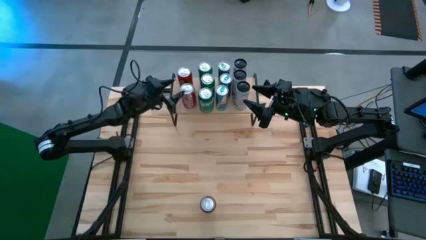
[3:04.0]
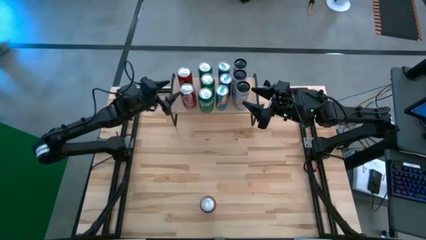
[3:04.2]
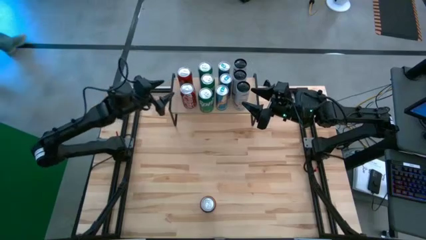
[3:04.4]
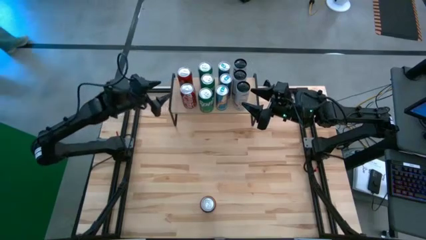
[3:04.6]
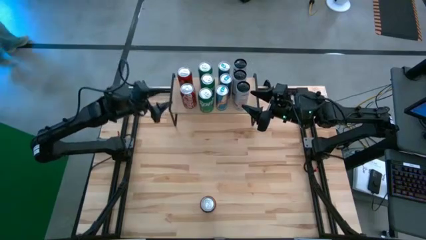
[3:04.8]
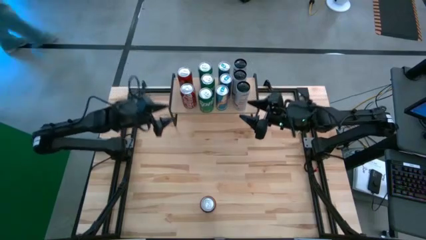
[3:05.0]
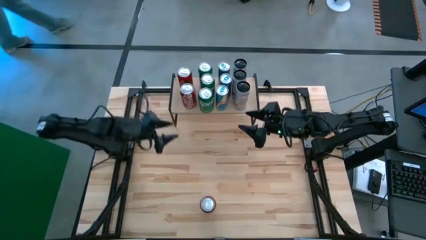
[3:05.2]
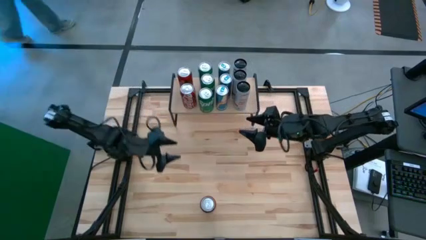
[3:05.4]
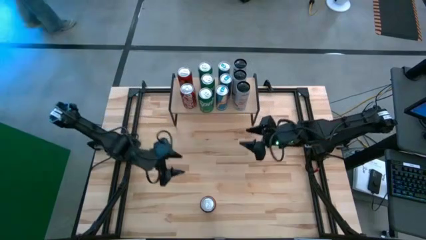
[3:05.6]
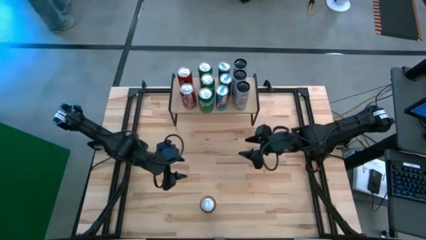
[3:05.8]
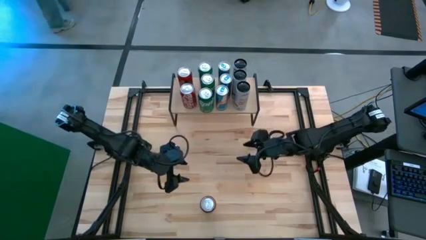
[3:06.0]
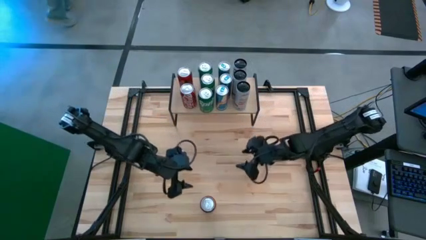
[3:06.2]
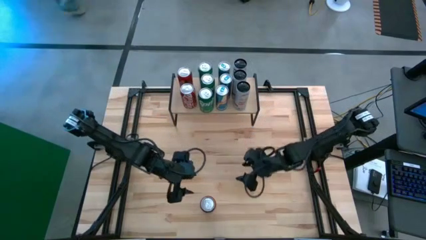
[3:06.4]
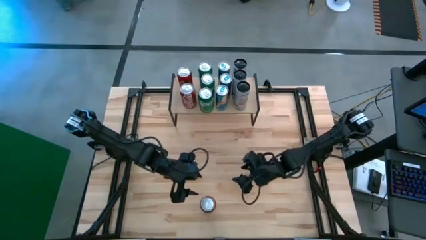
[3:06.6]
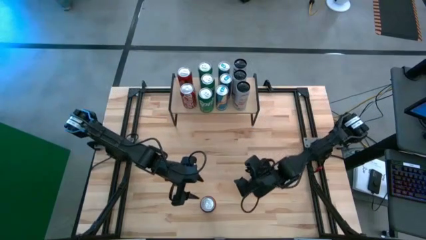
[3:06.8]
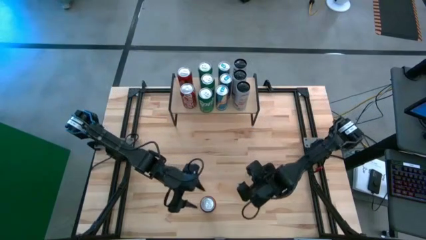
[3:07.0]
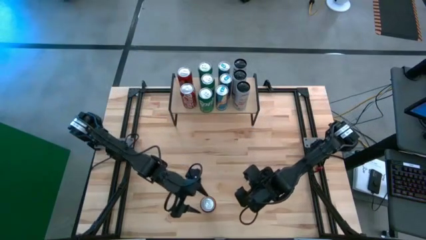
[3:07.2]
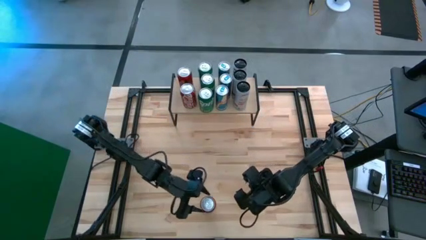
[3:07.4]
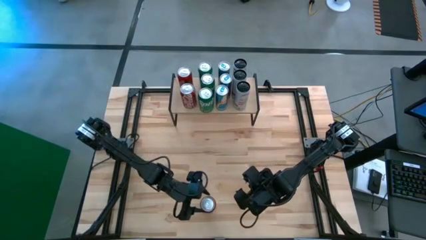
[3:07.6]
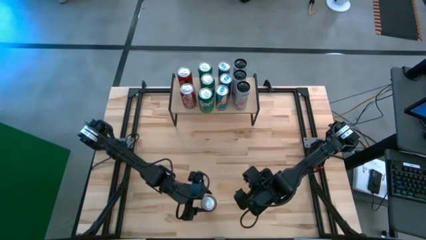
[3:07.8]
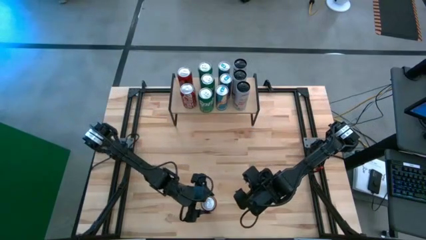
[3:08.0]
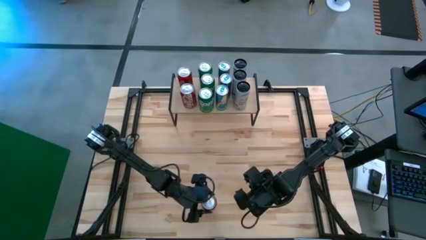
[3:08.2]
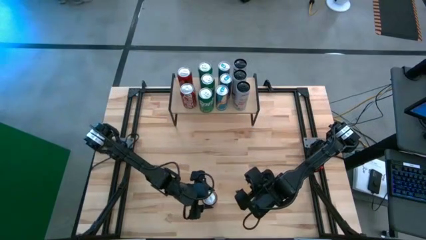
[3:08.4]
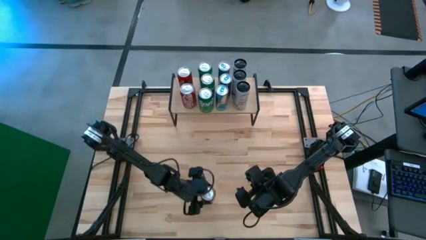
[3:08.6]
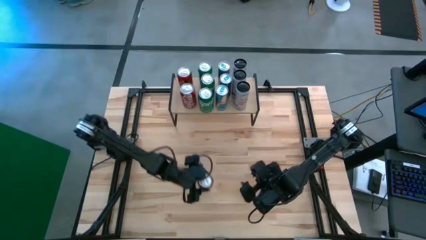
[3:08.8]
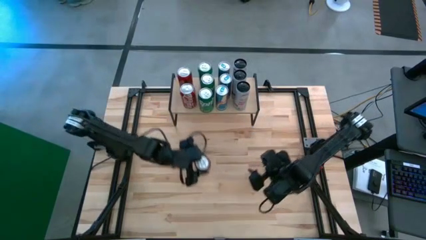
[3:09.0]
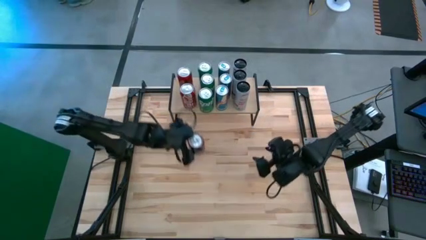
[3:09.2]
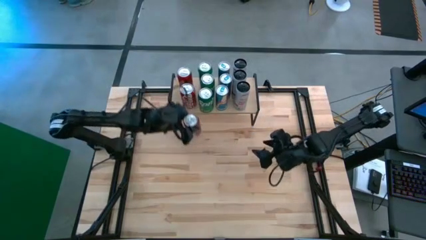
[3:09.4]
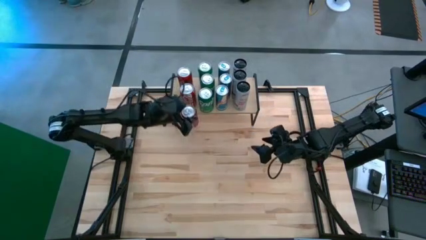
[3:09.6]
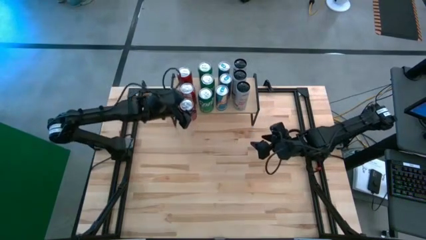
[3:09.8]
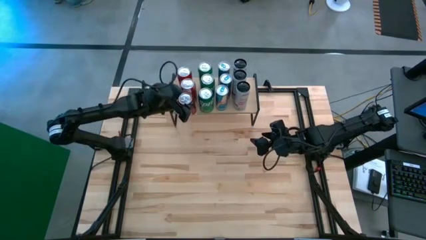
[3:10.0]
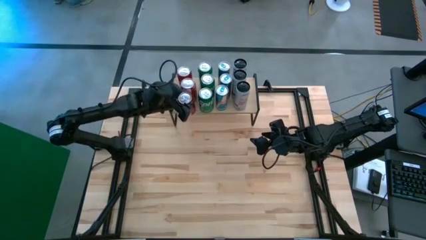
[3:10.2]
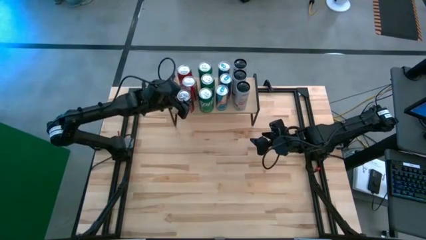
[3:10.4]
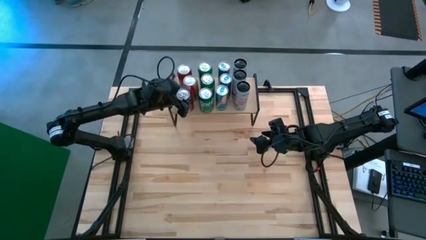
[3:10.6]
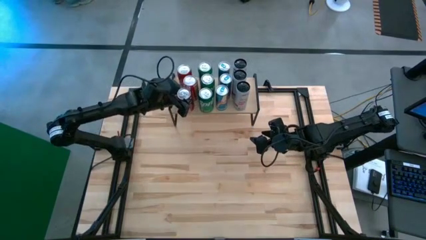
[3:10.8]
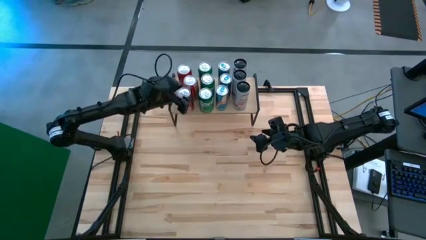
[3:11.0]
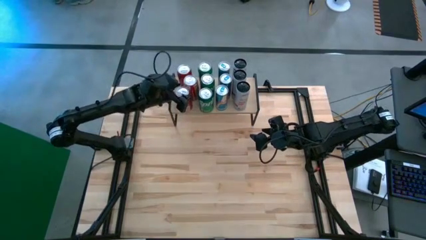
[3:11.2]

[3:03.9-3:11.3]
Task: Place canned beverage on shelf
Put the red soda can on the shelf aligned with the other red soda can

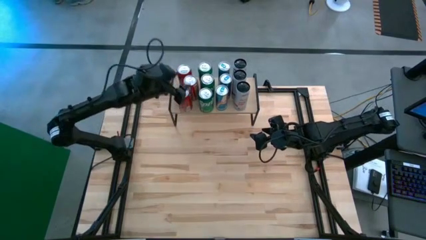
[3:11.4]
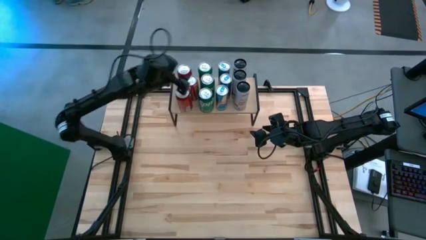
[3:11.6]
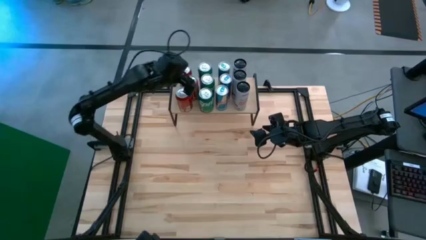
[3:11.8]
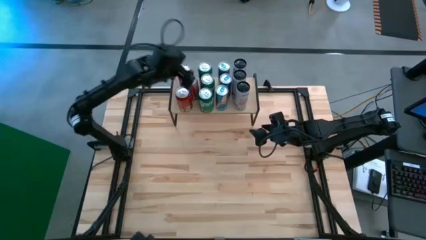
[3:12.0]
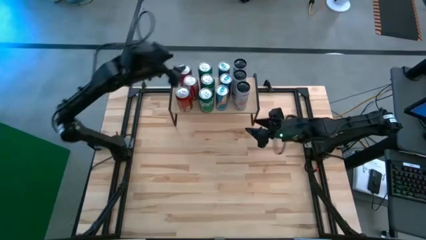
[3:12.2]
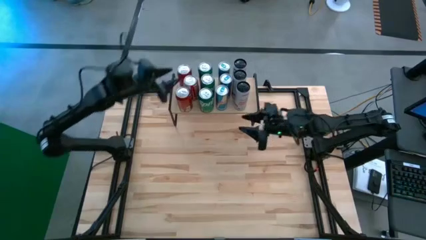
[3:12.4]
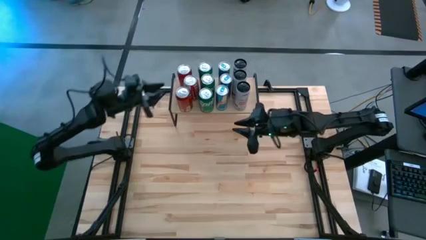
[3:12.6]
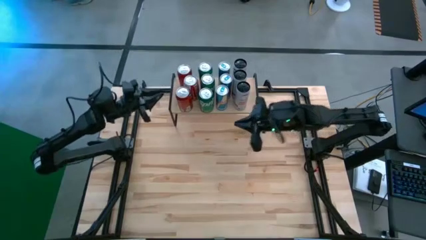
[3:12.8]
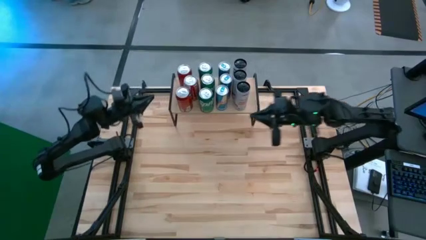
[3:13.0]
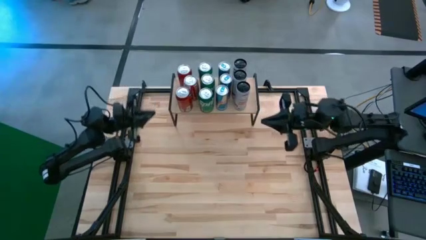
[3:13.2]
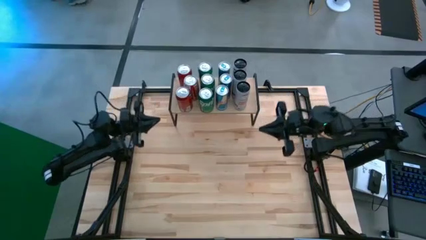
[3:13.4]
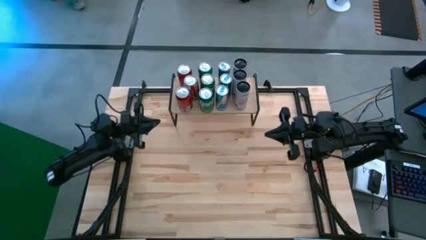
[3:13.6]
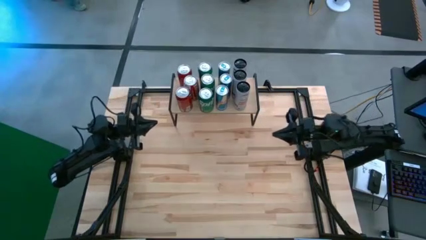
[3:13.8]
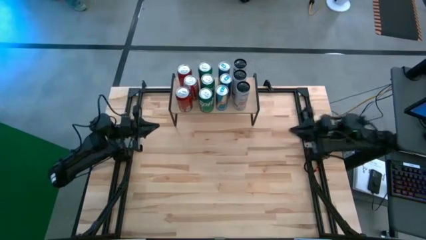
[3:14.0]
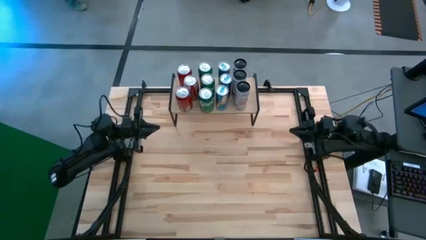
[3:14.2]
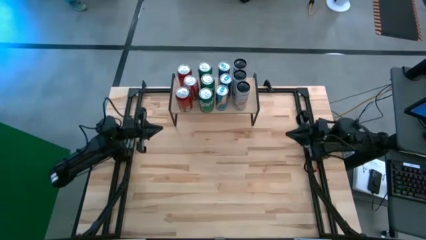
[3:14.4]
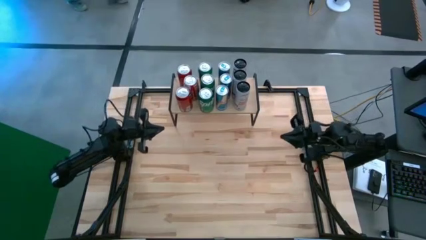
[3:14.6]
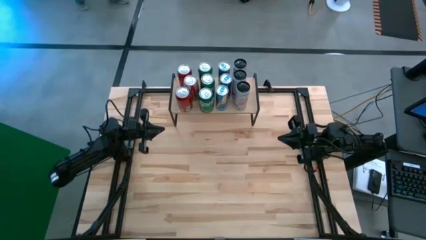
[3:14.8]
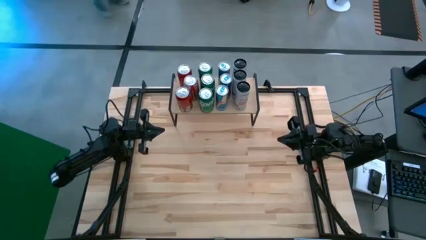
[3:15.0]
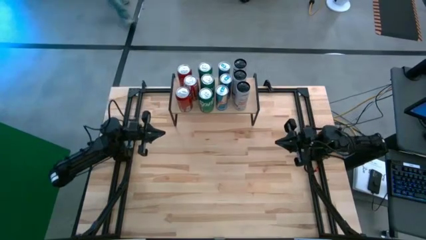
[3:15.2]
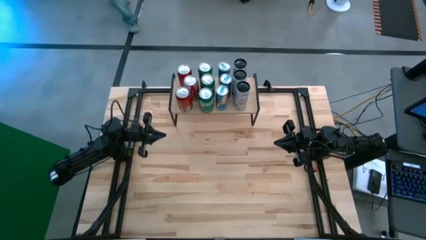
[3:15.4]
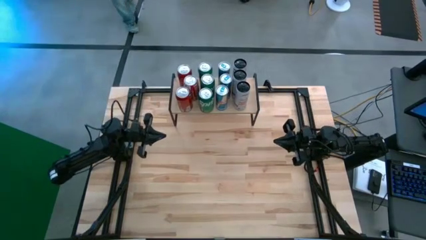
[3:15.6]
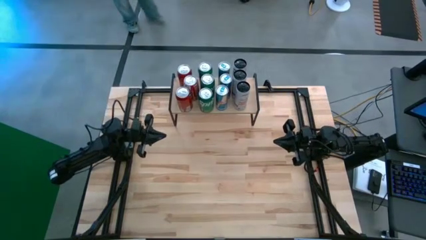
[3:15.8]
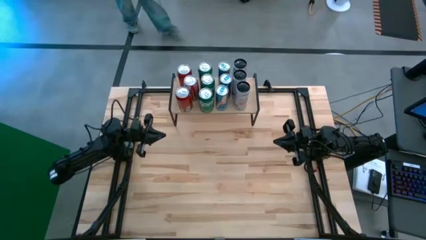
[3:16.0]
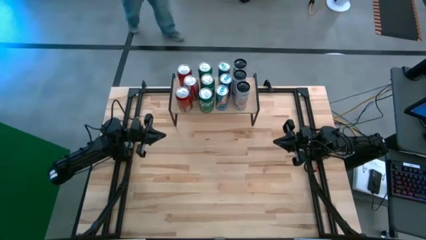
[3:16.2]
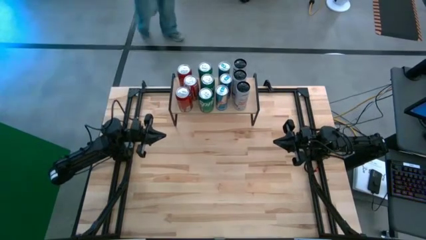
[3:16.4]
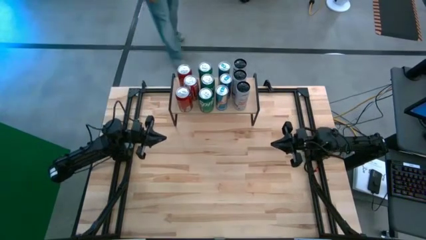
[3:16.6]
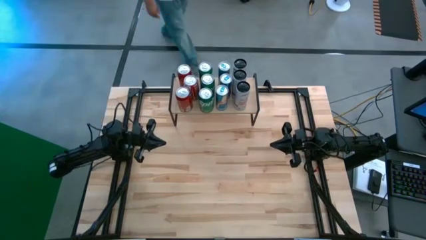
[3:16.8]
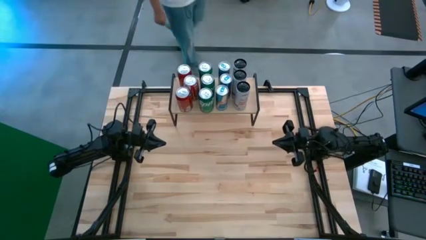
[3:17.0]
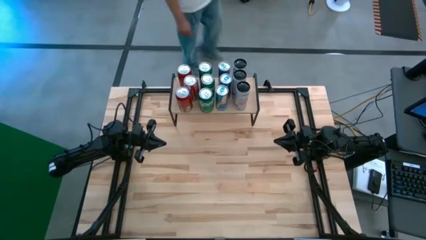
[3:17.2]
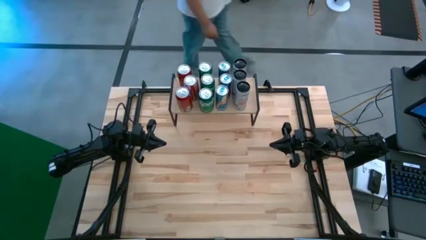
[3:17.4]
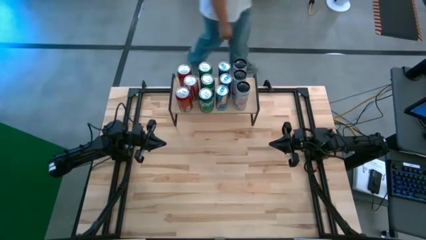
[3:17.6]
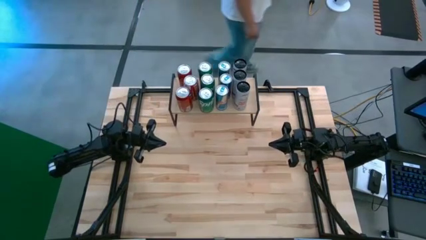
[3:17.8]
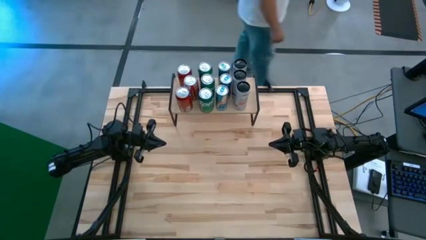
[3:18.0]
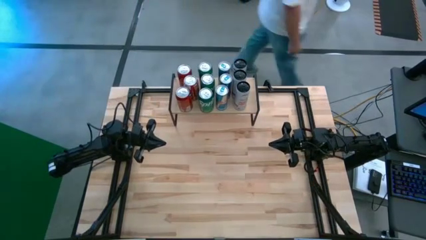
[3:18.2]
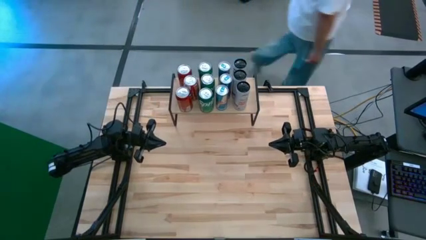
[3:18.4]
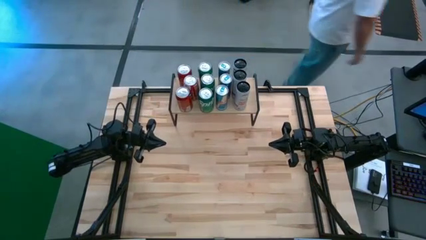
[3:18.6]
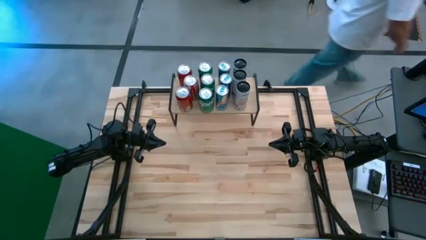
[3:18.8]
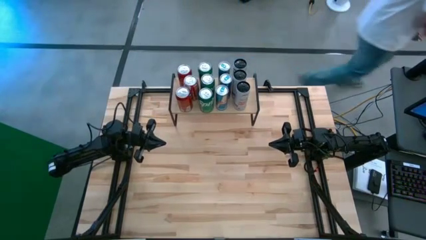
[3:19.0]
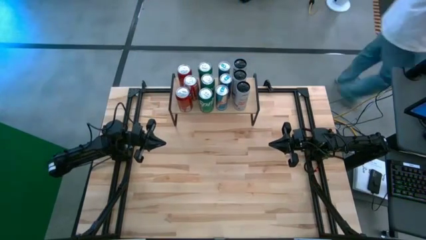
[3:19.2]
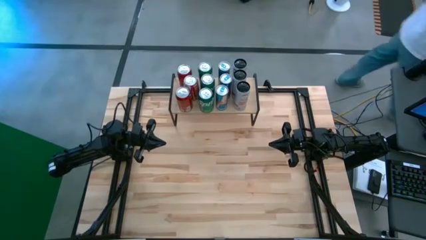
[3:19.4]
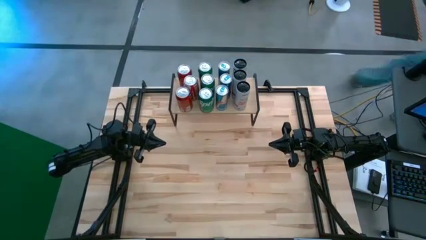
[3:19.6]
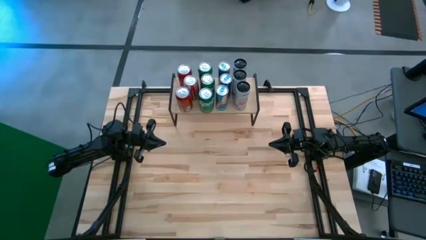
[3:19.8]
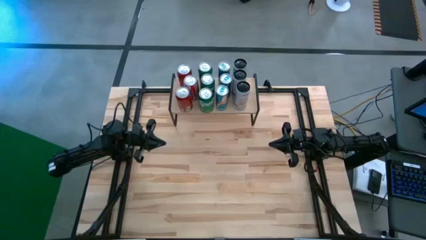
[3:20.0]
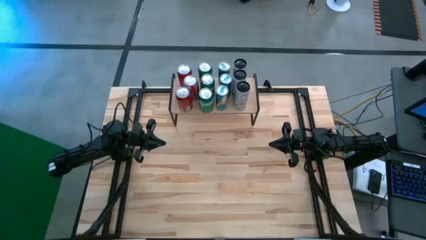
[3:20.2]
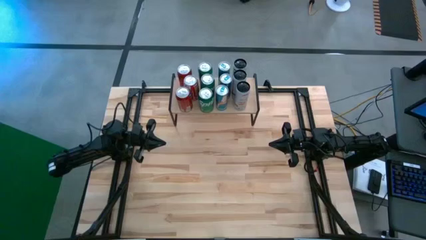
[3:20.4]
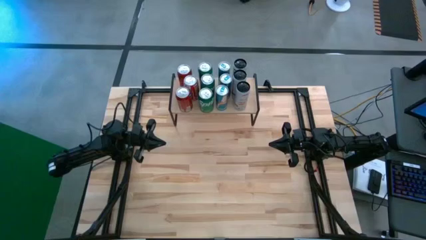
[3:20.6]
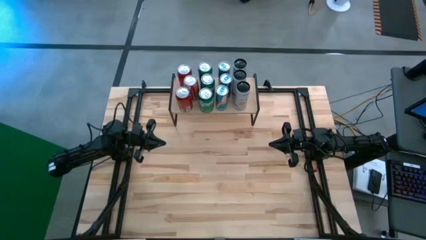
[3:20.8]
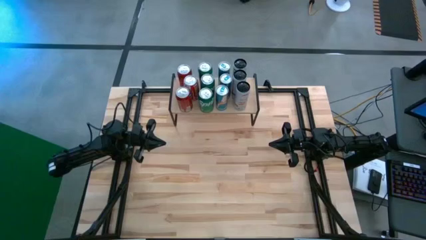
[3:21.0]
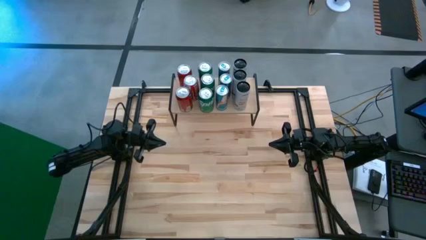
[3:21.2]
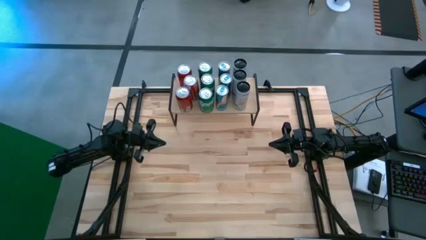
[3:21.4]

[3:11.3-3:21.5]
Return to Home Position
